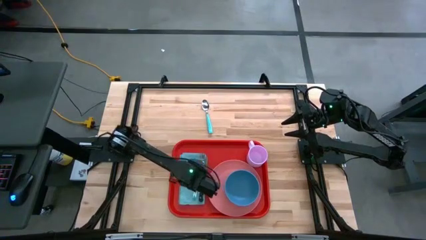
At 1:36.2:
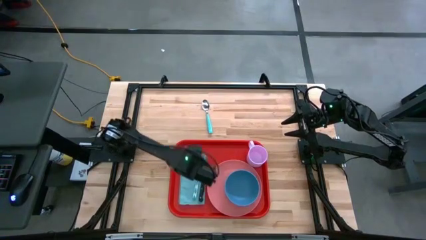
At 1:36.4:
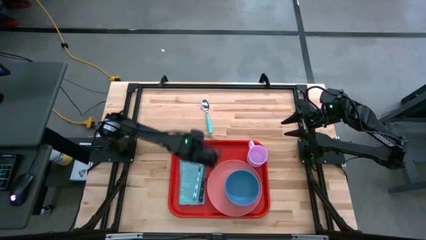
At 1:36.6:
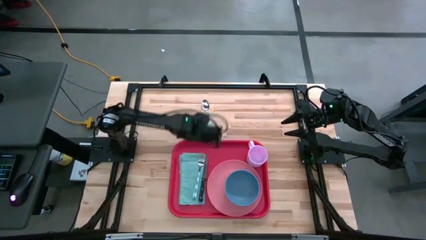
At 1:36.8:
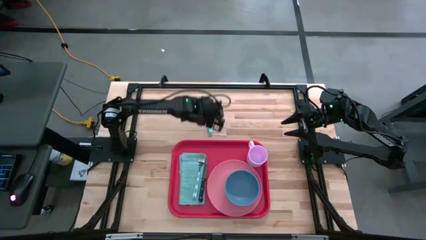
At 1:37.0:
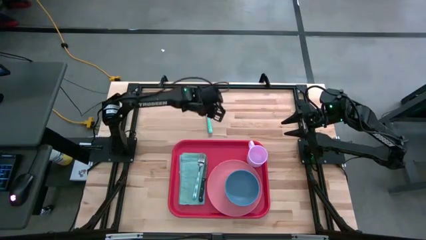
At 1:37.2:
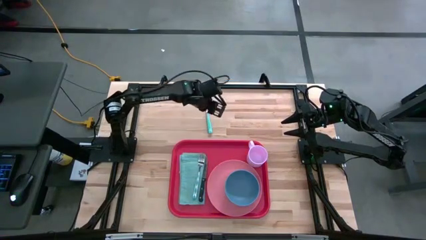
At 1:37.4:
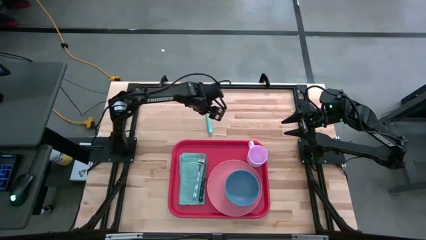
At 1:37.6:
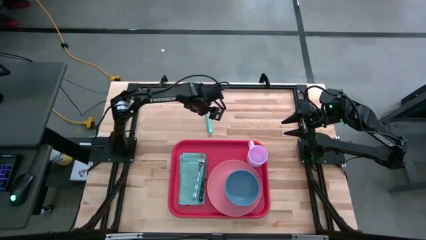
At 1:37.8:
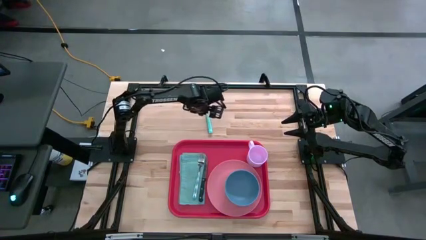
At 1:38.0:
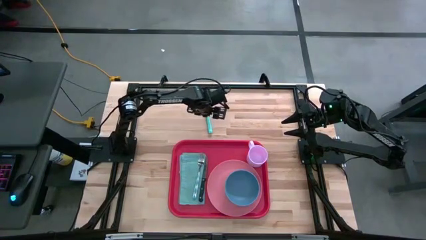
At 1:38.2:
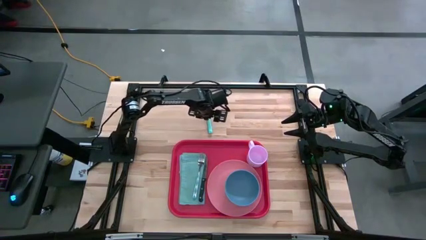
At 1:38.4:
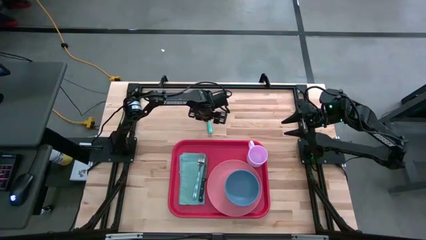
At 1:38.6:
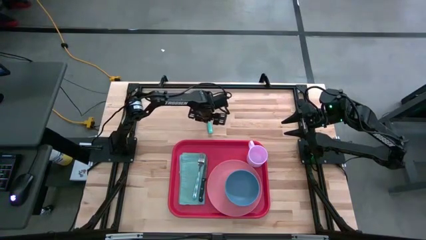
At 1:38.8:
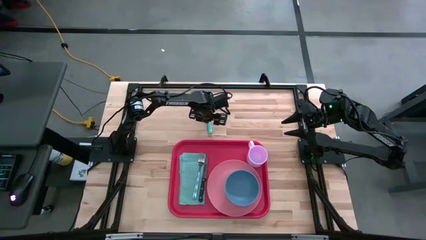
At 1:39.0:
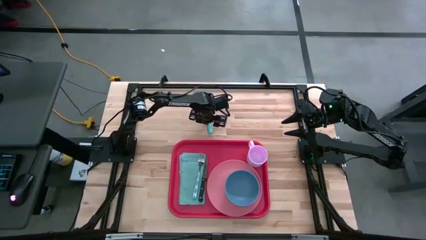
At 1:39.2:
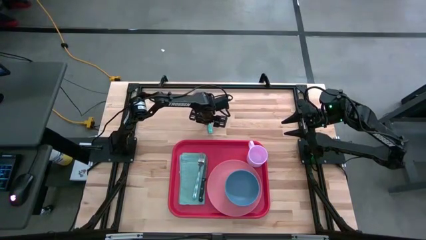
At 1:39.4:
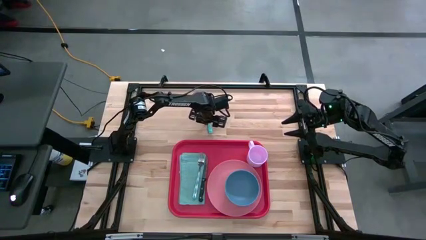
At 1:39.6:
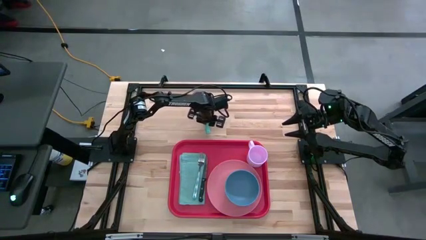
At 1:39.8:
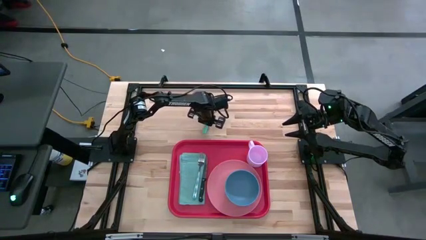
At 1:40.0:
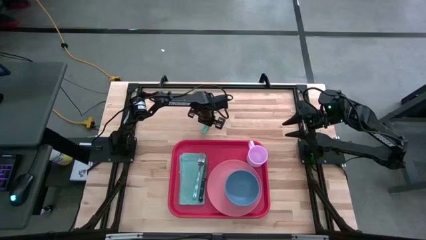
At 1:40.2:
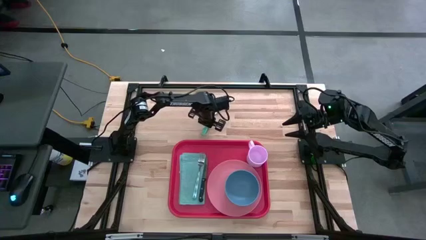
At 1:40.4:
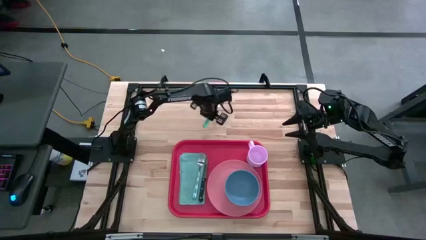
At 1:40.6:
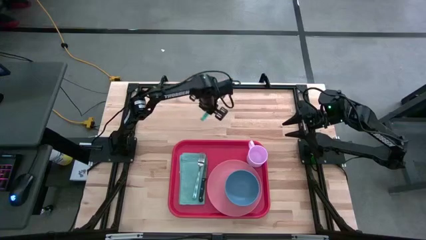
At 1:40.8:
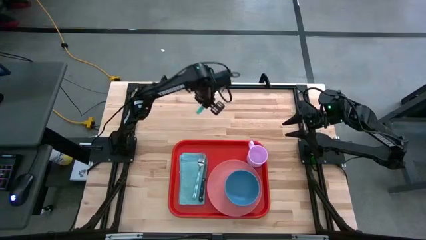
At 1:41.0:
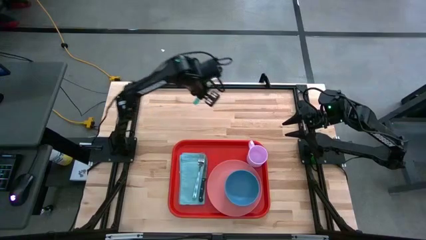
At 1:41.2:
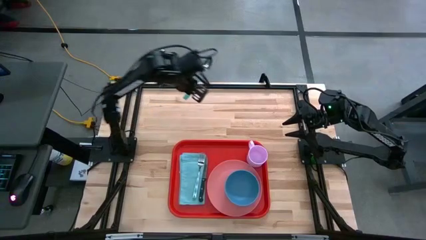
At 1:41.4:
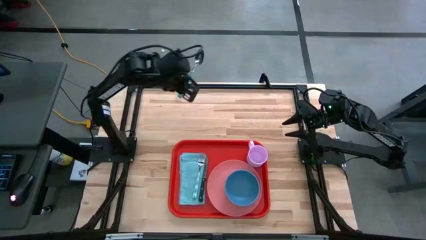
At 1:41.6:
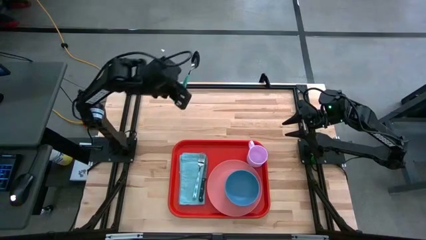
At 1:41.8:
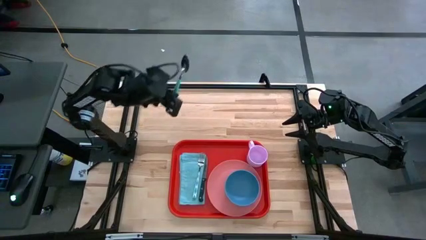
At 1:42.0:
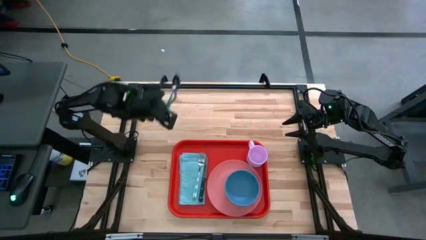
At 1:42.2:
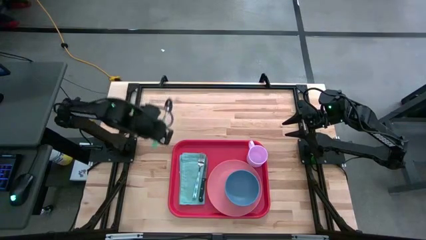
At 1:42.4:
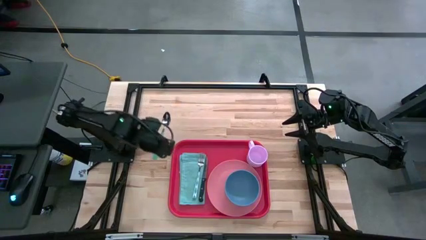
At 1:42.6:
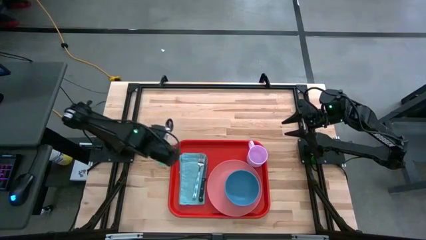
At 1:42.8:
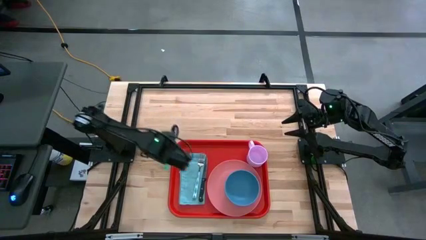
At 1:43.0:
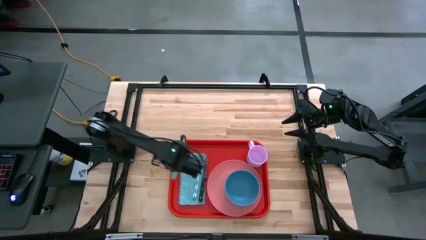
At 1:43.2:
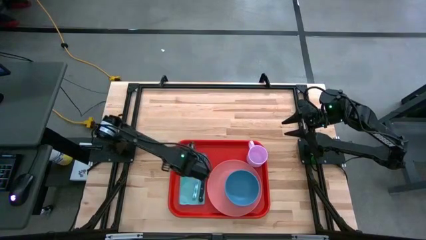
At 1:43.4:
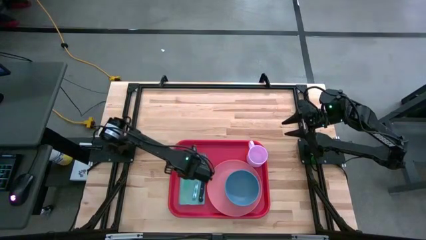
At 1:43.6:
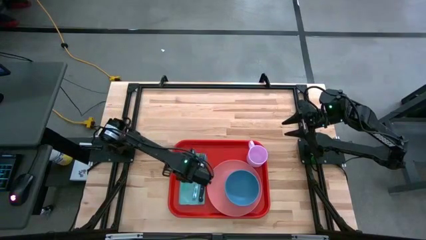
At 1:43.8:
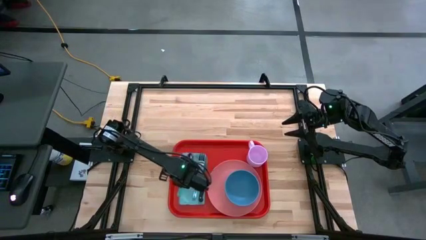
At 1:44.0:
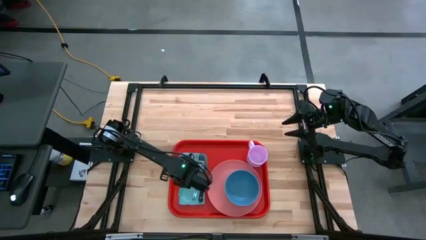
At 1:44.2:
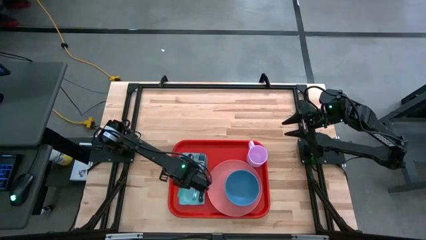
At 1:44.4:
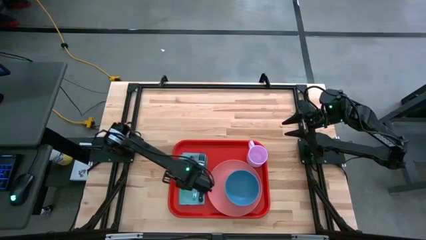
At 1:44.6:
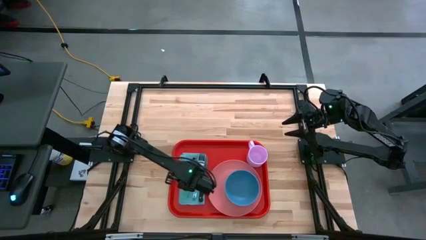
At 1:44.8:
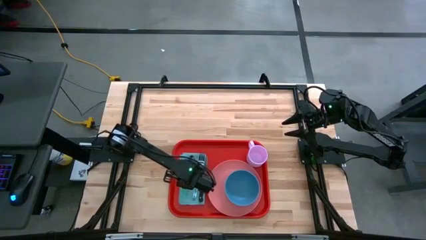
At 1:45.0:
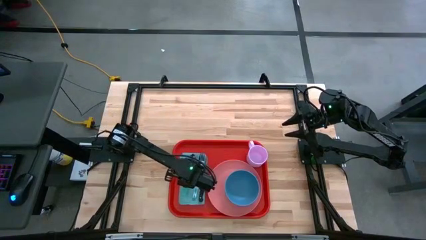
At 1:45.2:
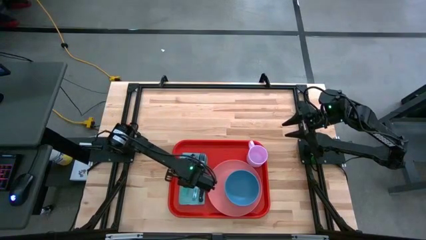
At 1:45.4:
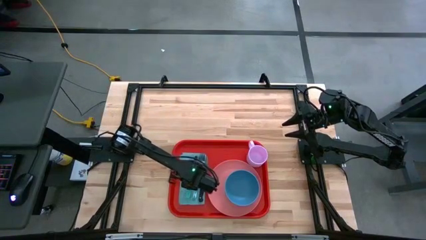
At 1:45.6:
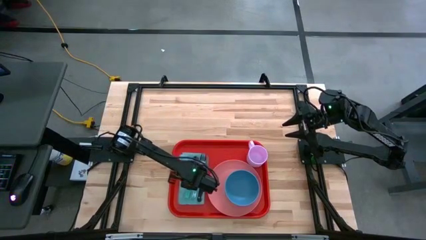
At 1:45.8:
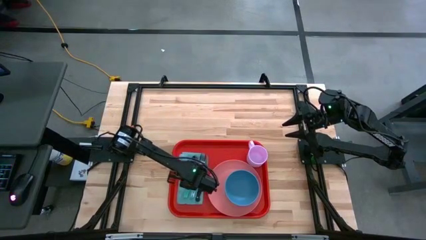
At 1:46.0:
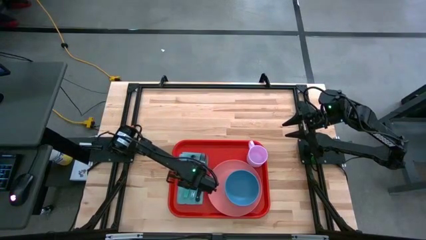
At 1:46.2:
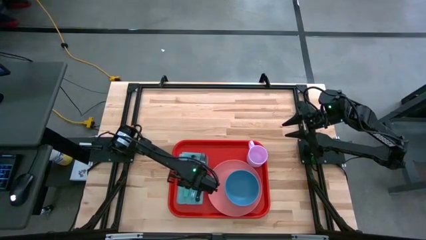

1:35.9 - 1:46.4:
Task: Set up tray
Put the blue spoon on top of the napkin to the left of the blue and white patterned fork

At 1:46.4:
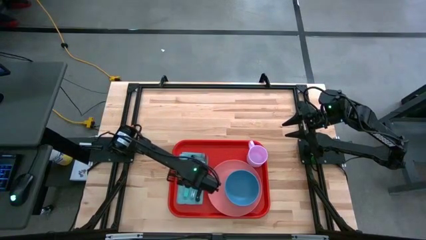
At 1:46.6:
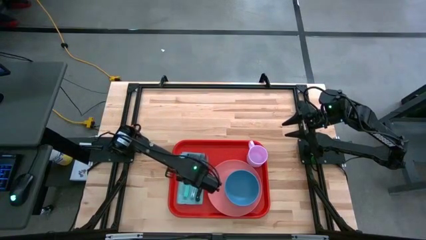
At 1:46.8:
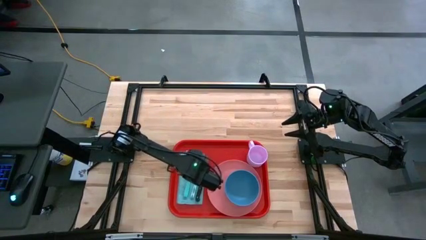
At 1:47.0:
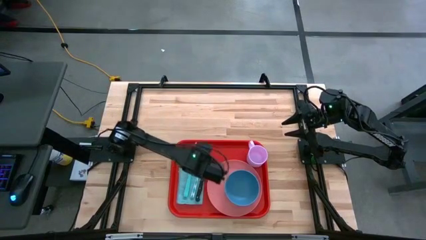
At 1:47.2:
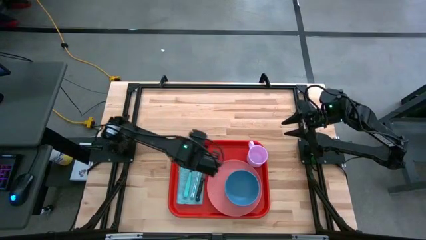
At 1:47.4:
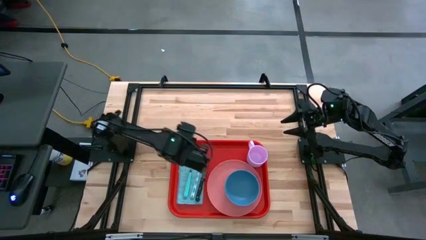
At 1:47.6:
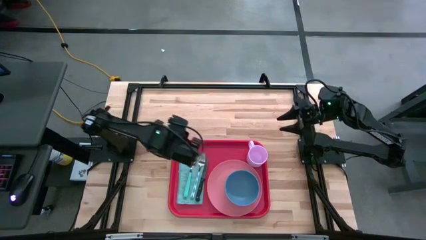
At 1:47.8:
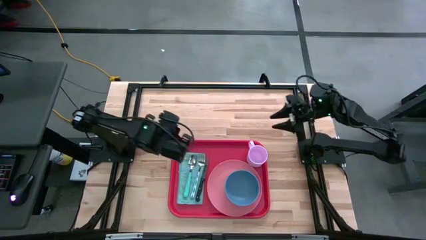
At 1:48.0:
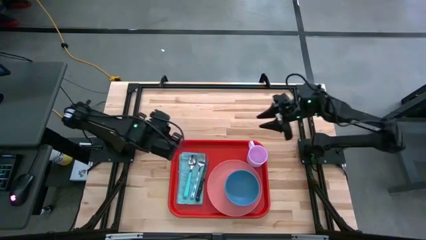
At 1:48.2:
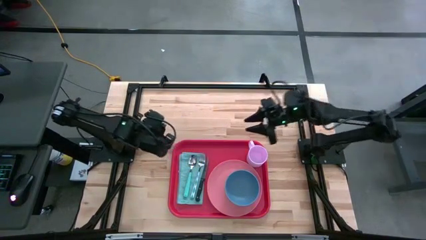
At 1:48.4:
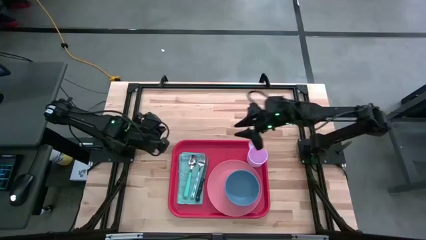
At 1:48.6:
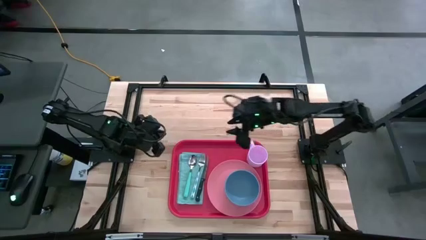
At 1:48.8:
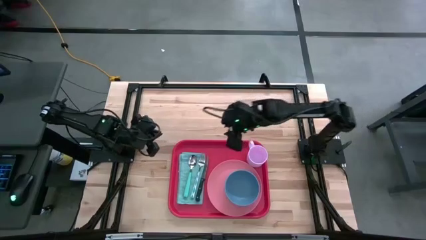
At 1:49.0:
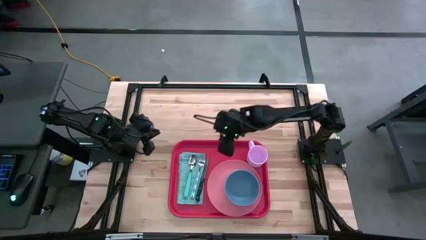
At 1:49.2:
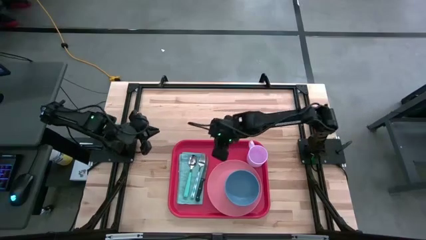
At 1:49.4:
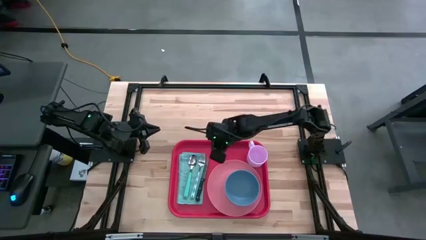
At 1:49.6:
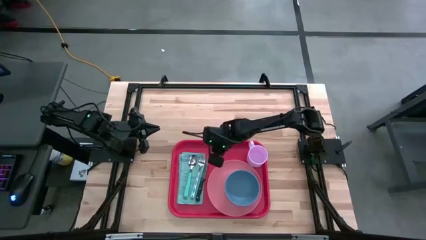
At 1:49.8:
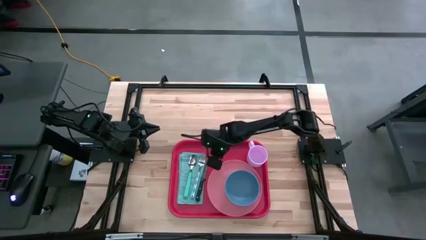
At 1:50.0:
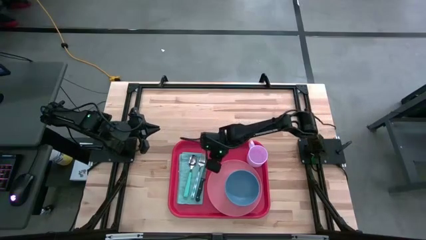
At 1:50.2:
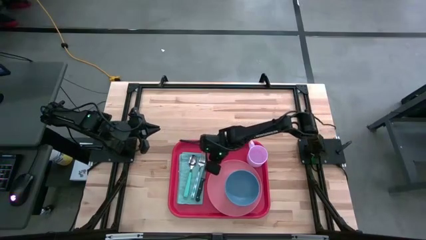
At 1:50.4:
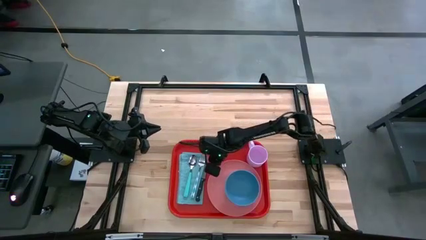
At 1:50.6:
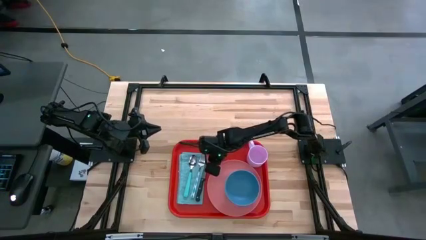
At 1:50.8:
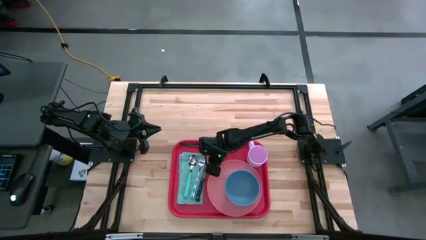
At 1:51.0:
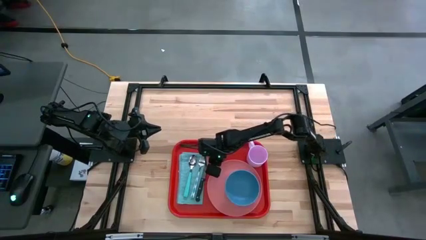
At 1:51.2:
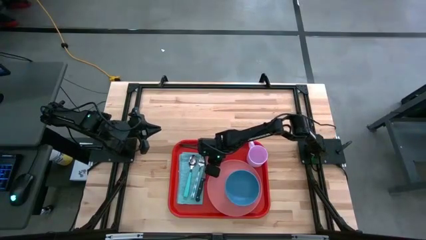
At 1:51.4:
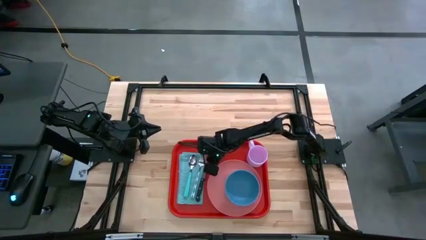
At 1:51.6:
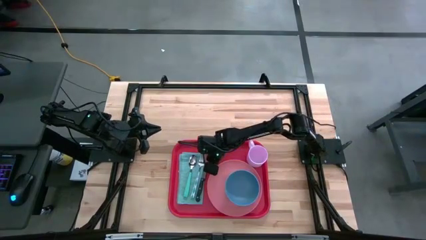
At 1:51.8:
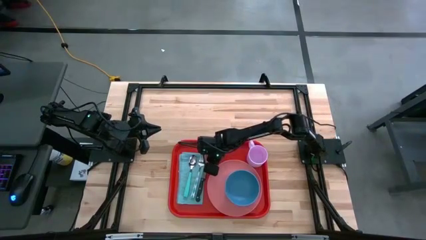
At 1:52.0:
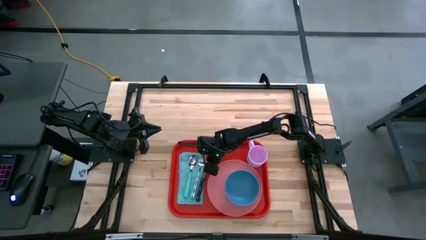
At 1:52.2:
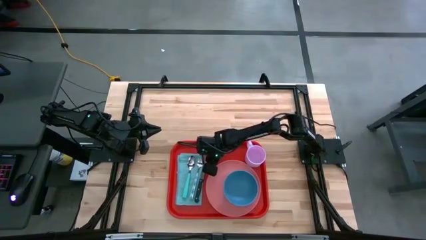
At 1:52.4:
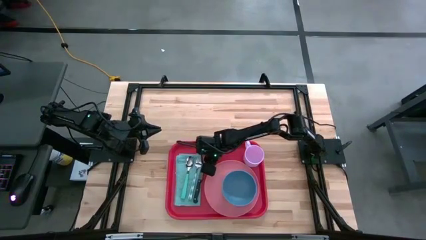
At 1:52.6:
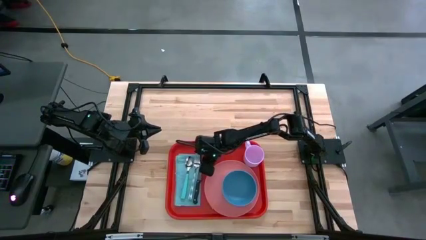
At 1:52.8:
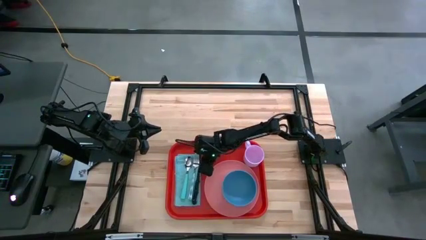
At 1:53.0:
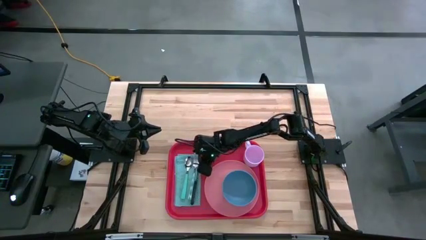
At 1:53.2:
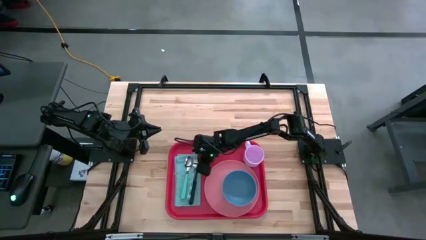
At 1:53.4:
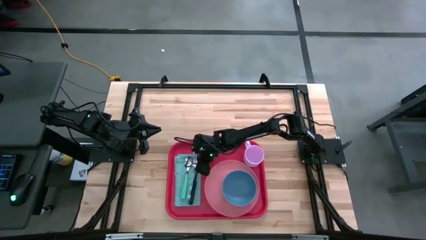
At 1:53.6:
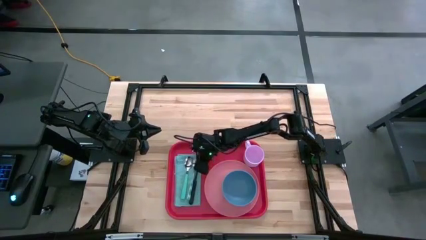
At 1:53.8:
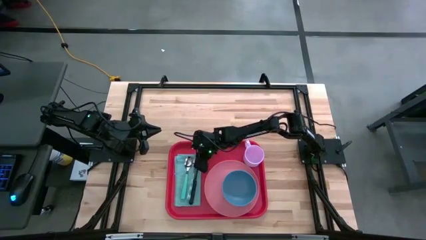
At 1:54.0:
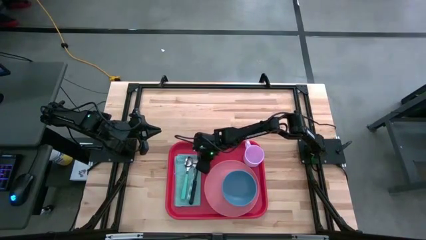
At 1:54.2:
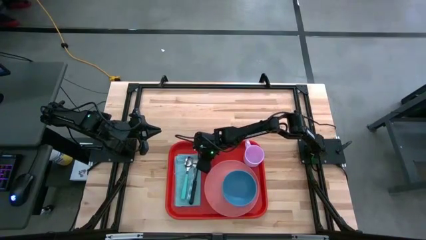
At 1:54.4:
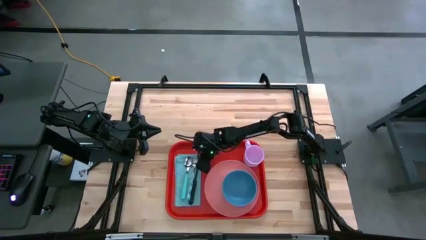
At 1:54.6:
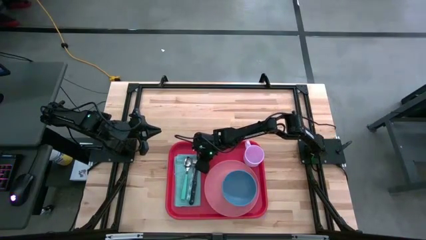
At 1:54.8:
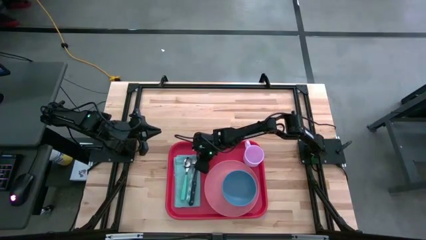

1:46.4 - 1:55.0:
Adjust the black knife
